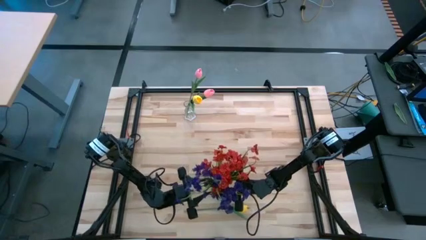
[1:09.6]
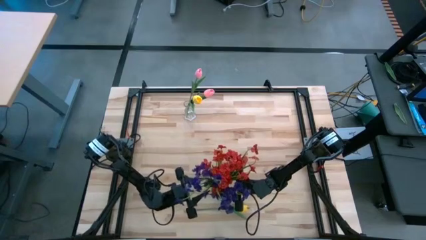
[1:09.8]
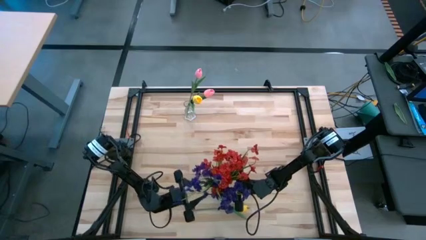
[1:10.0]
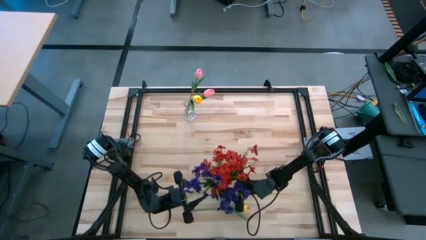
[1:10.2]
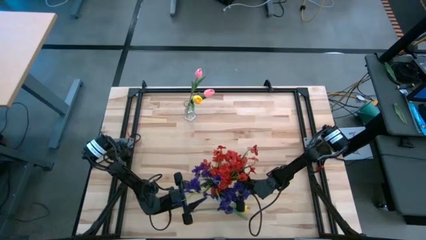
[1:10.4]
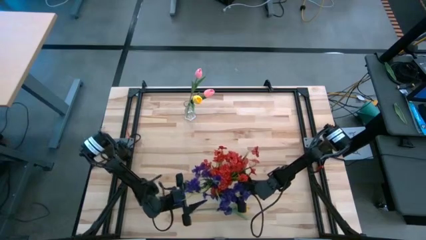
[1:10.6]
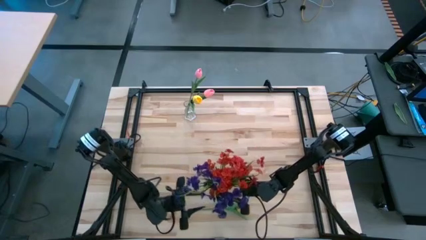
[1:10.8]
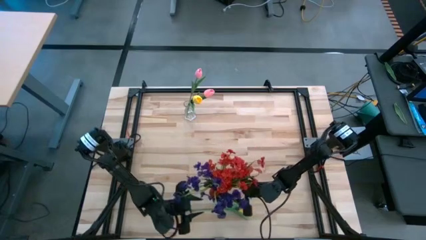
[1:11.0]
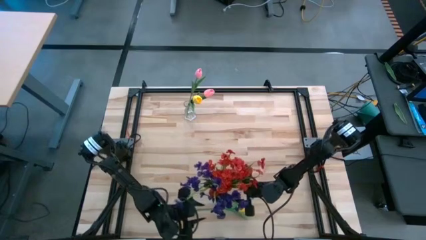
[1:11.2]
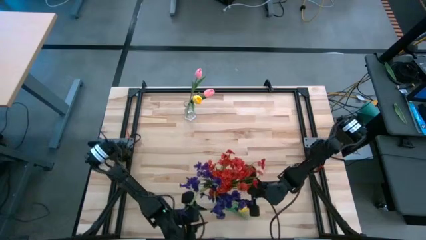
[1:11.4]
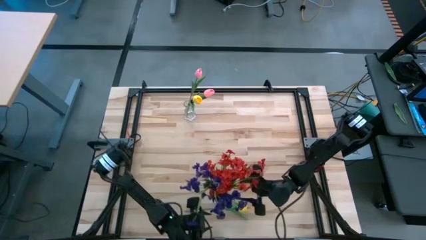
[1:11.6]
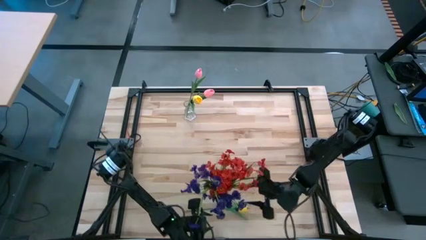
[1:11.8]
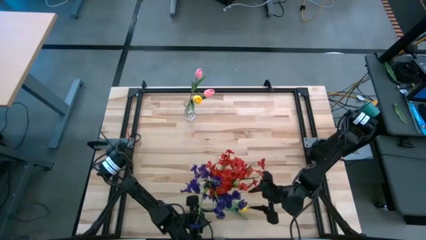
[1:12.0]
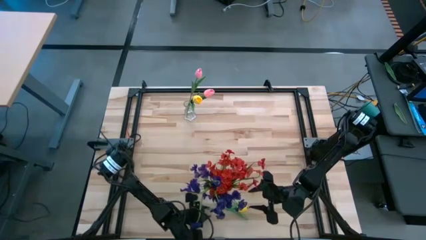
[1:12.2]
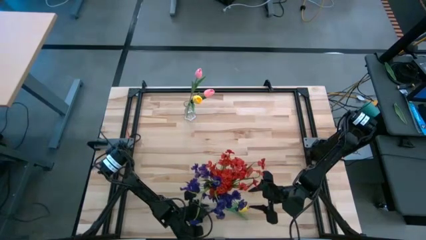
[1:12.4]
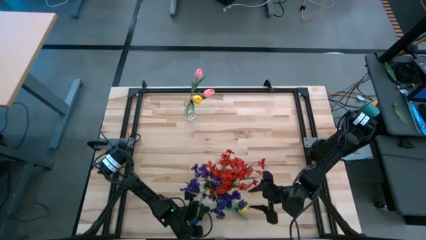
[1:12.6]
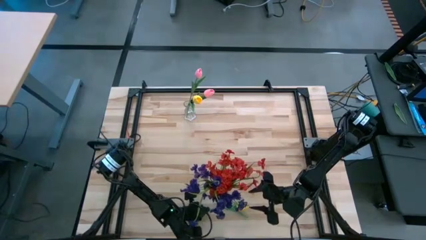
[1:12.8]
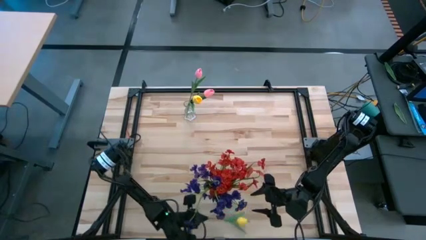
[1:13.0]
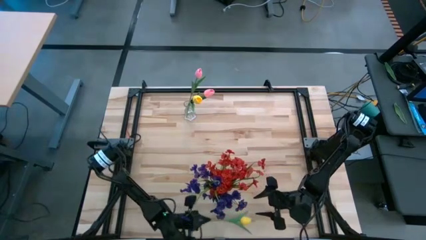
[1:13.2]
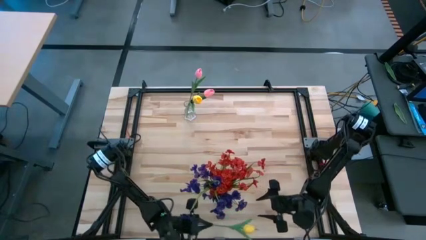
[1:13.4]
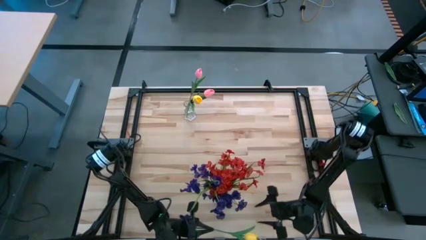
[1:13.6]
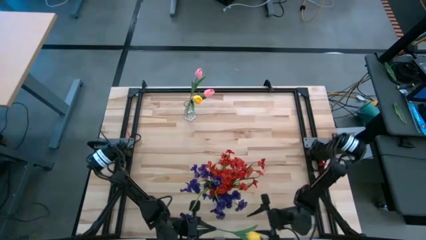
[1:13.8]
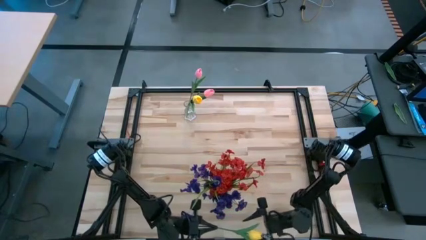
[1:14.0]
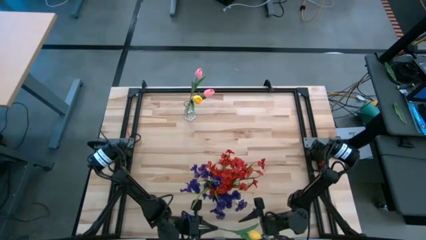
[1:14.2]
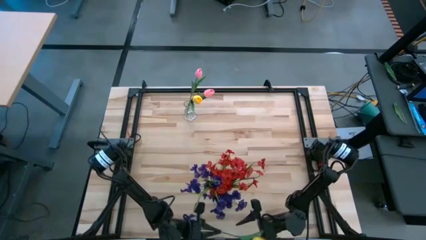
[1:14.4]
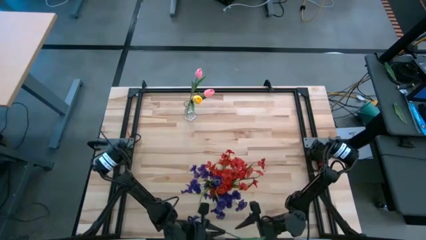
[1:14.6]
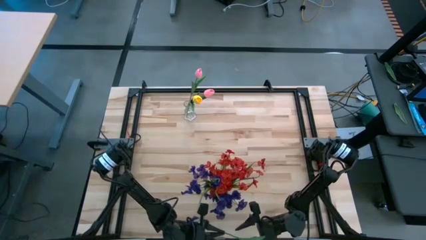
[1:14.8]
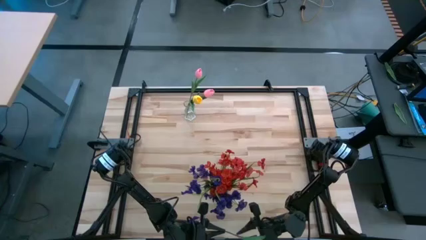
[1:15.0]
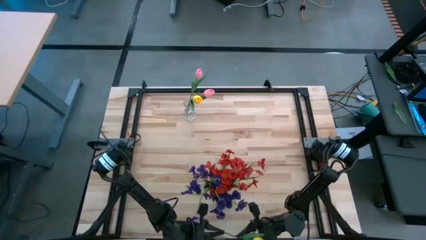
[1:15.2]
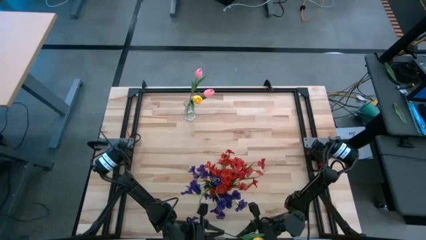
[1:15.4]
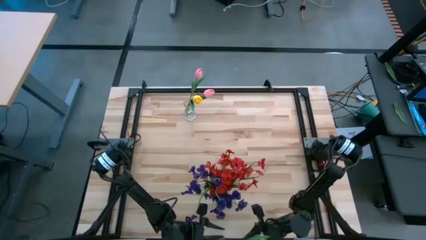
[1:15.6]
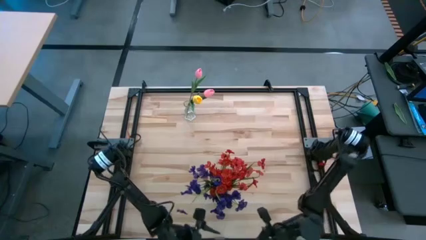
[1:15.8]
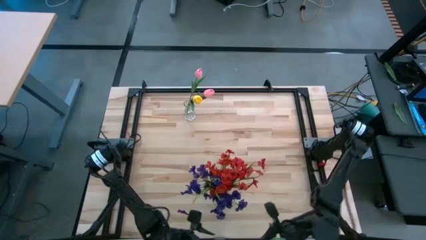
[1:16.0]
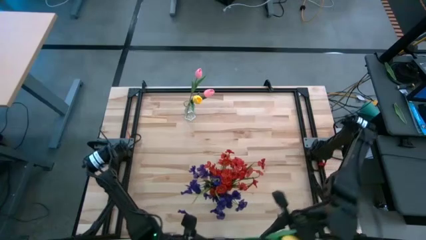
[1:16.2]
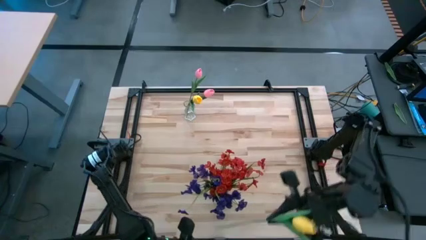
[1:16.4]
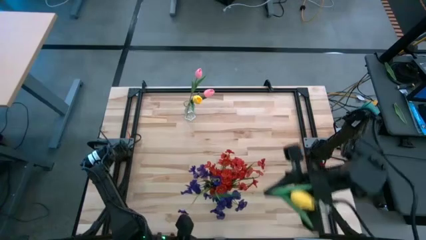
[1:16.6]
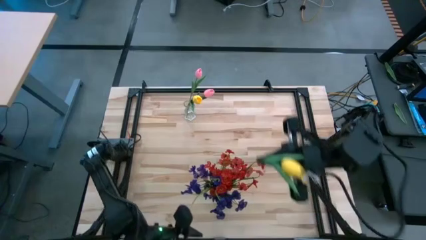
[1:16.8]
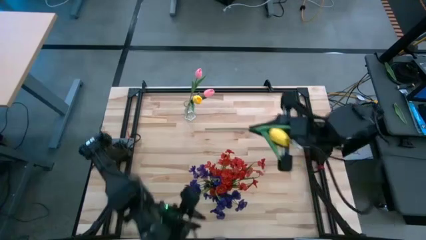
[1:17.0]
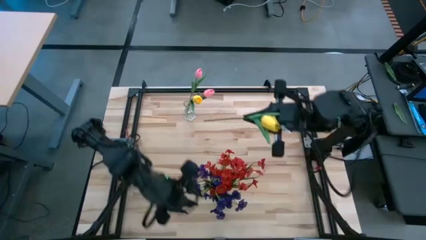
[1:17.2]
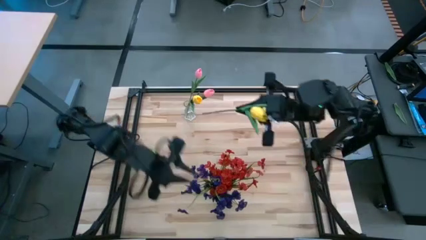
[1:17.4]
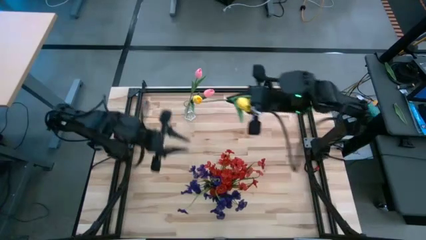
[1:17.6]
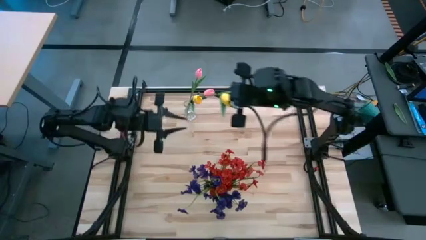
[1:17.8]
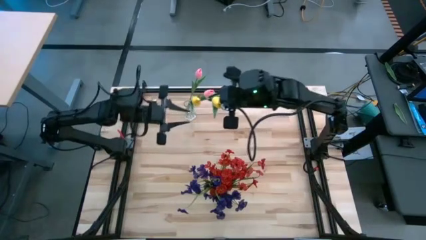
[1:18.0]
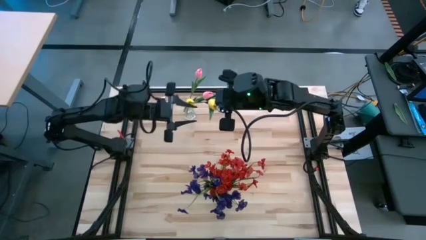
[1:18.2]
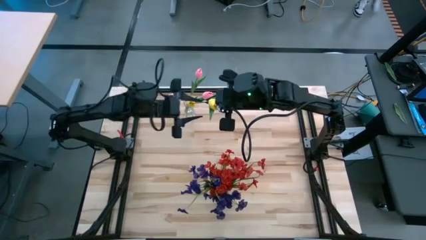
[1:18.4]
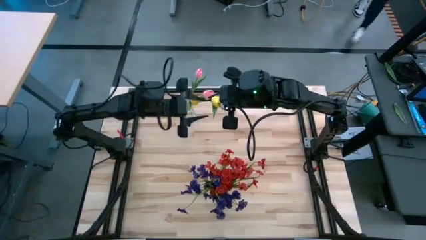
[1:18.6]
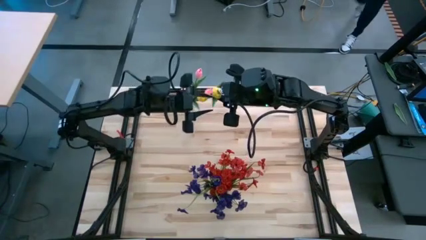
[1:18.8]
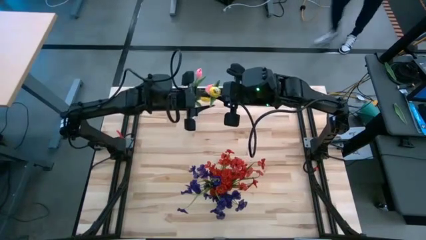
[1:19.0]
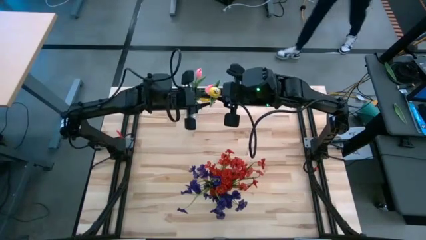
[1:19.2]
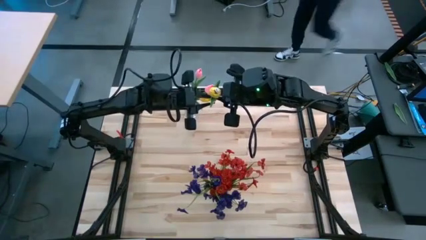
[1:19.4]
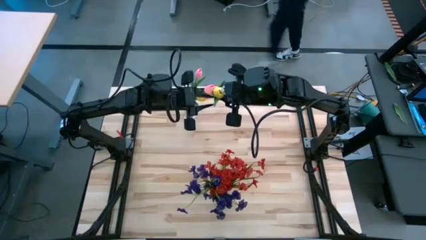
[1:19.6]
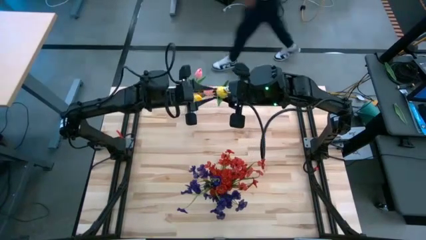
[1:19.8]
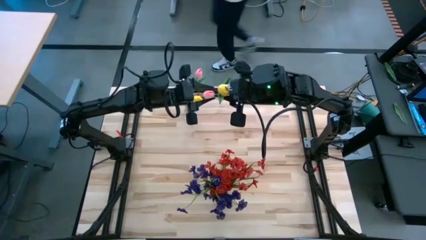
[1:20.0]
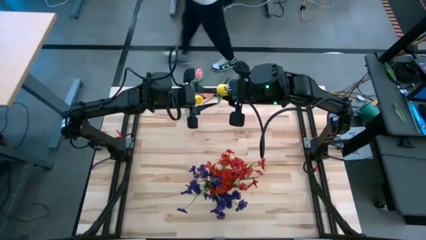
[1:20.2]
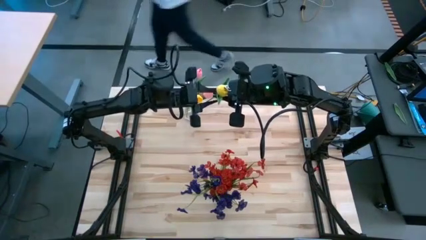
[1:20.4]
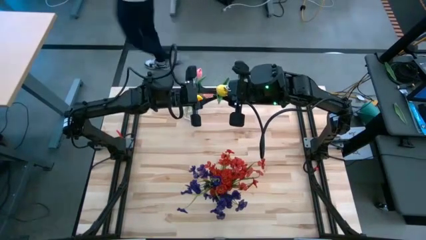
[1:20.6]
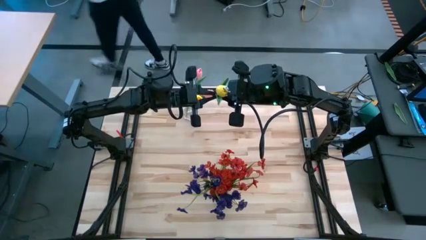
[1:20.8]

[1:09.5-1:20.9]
Task: Sort flowers into vase by color
Put the yellow flower into the transparent vase
